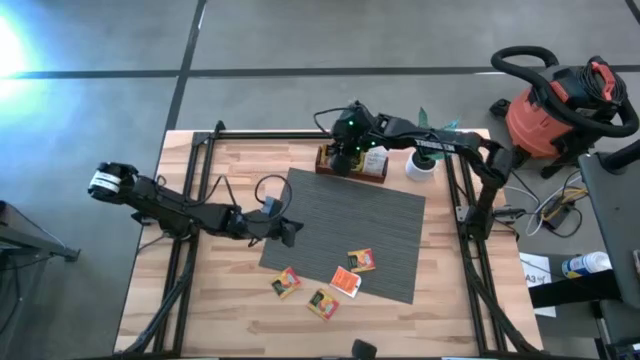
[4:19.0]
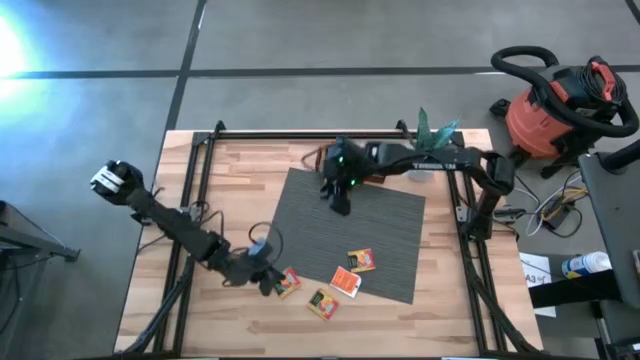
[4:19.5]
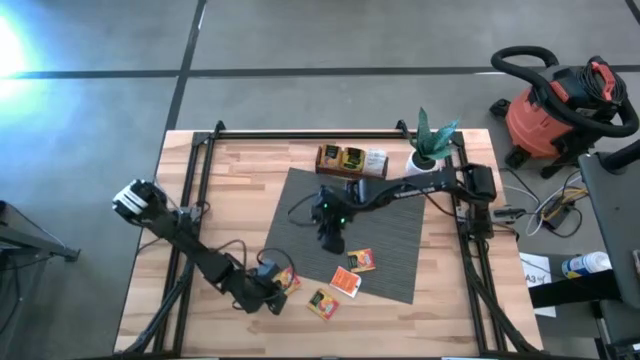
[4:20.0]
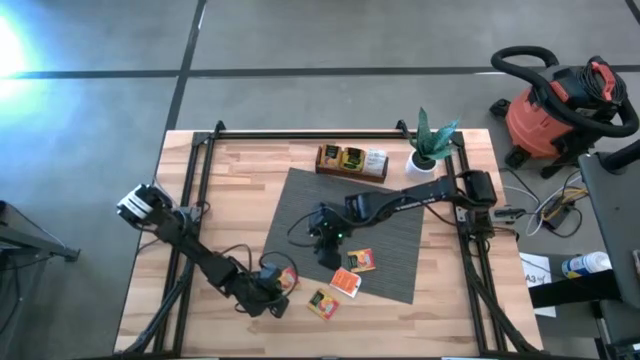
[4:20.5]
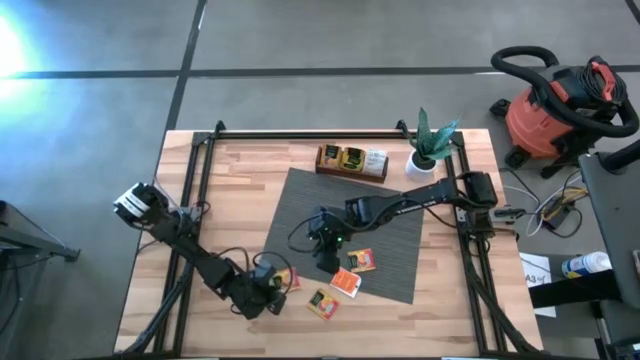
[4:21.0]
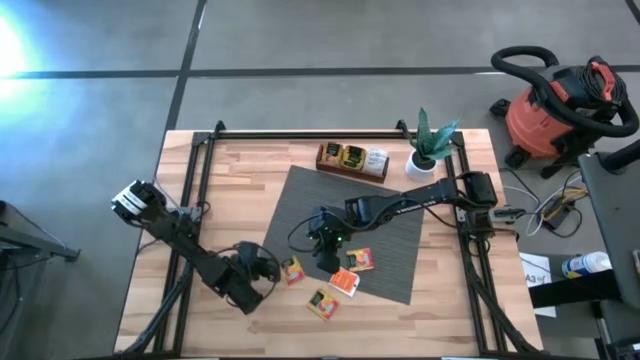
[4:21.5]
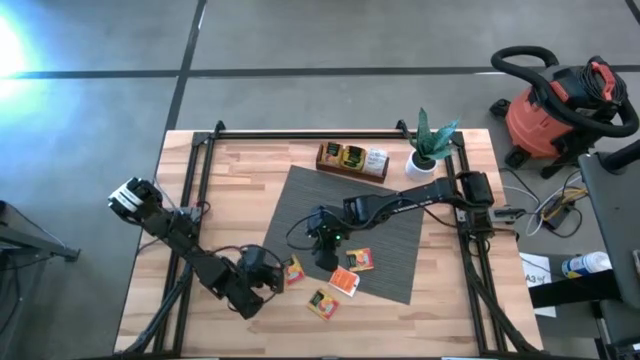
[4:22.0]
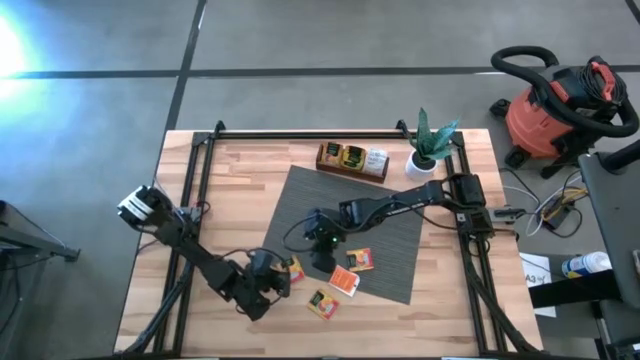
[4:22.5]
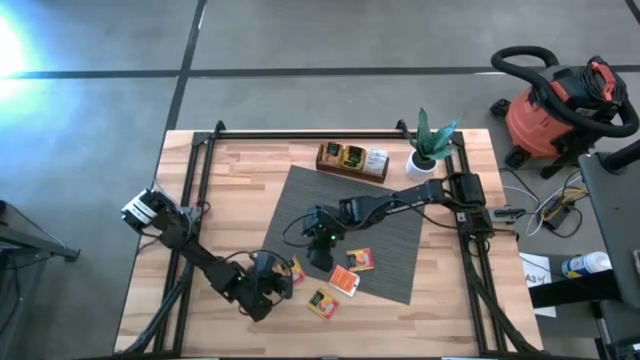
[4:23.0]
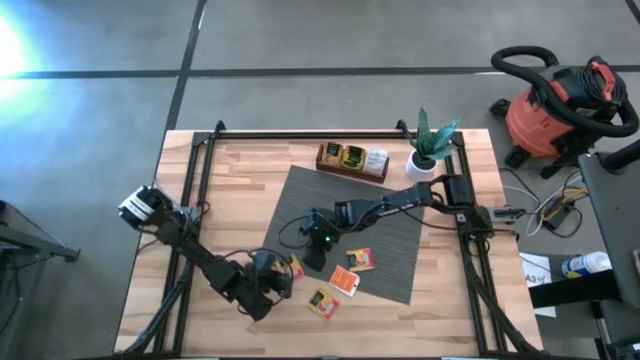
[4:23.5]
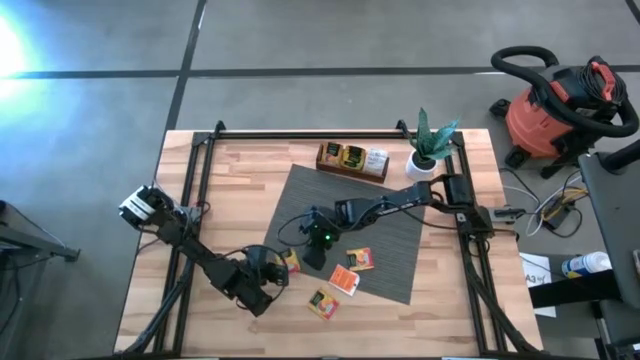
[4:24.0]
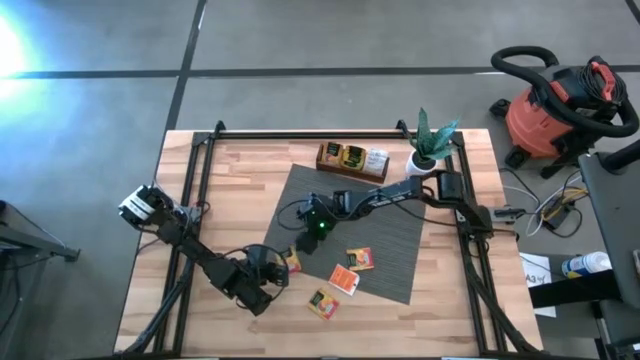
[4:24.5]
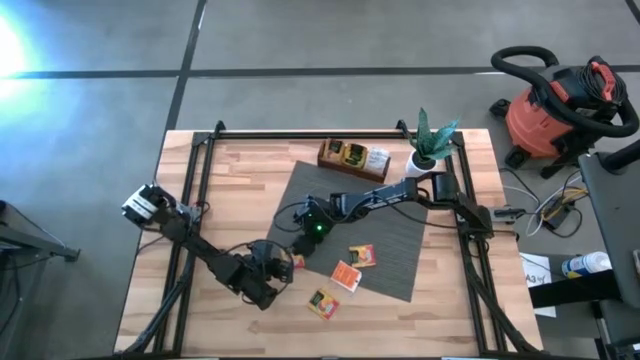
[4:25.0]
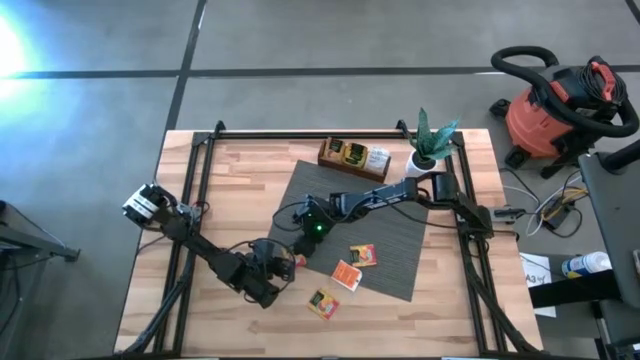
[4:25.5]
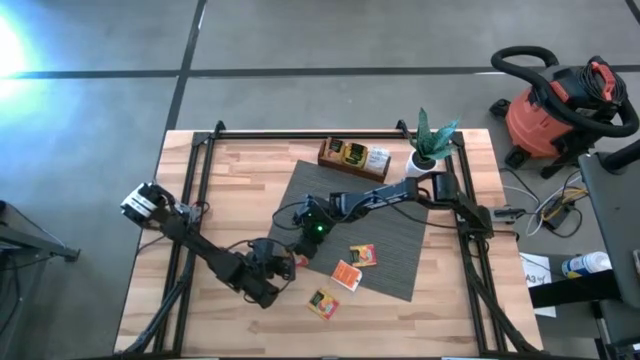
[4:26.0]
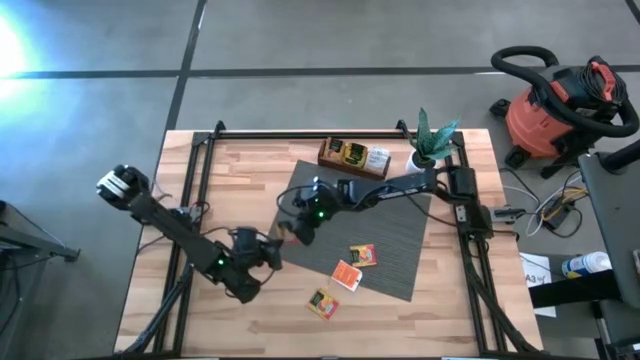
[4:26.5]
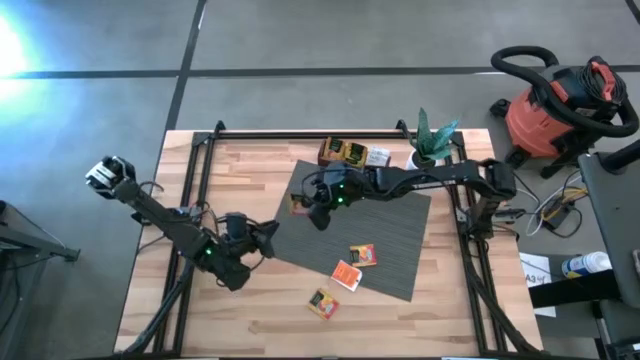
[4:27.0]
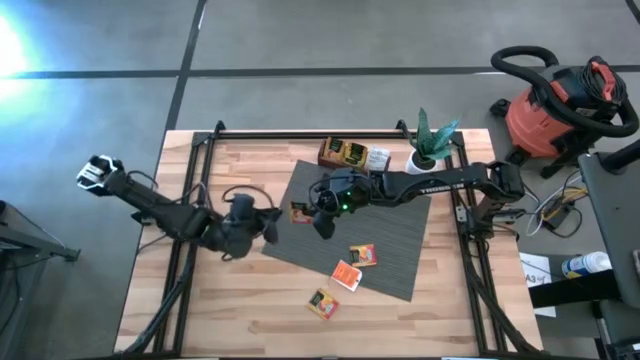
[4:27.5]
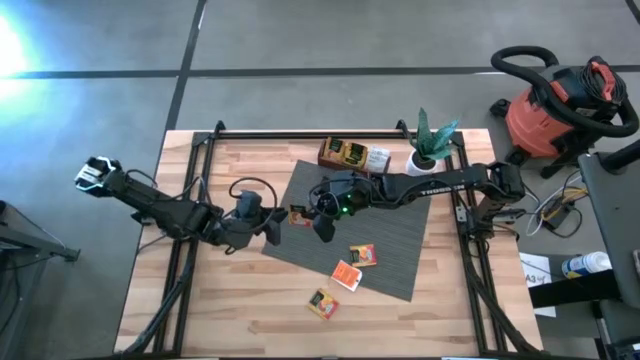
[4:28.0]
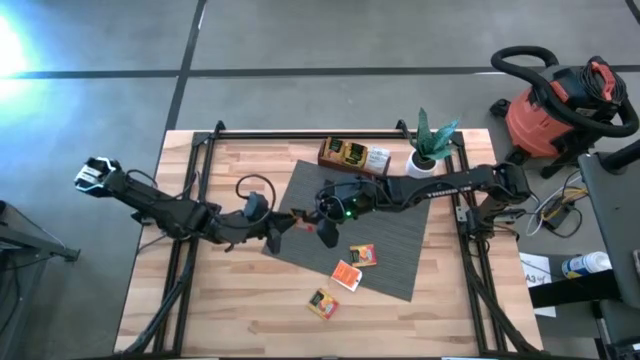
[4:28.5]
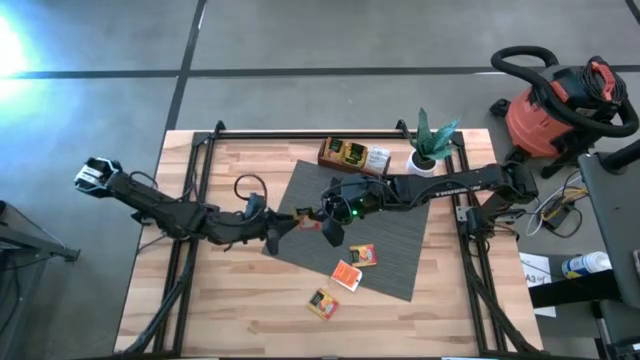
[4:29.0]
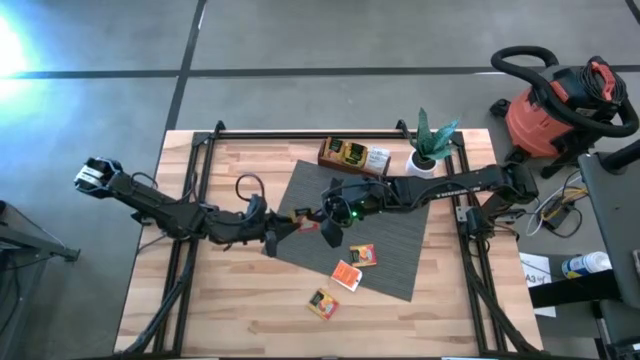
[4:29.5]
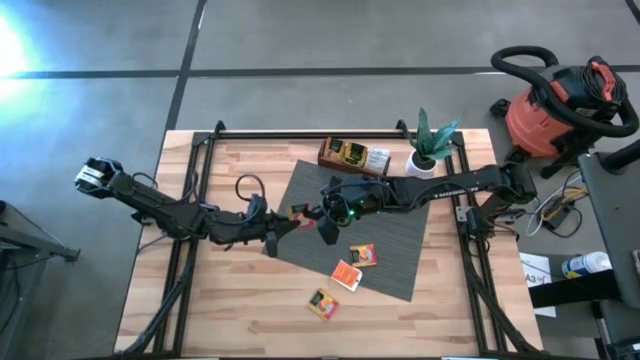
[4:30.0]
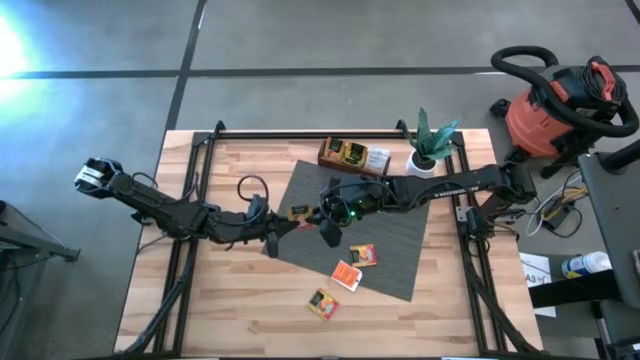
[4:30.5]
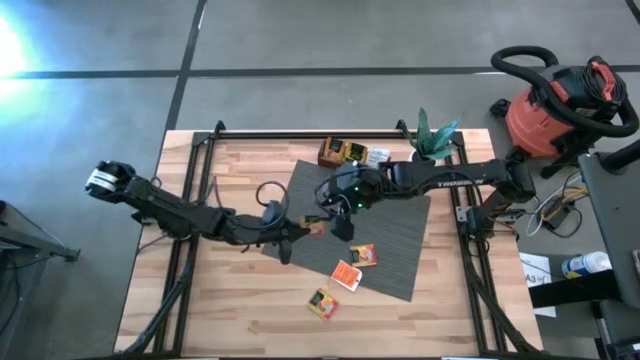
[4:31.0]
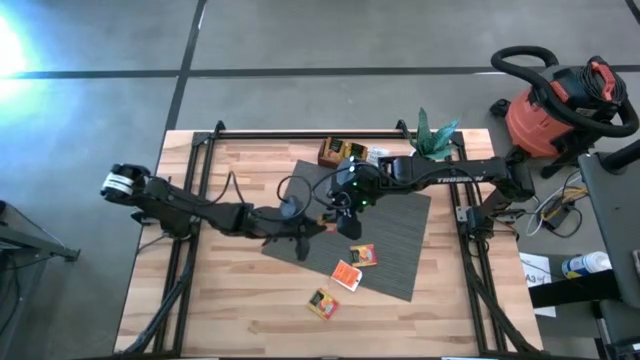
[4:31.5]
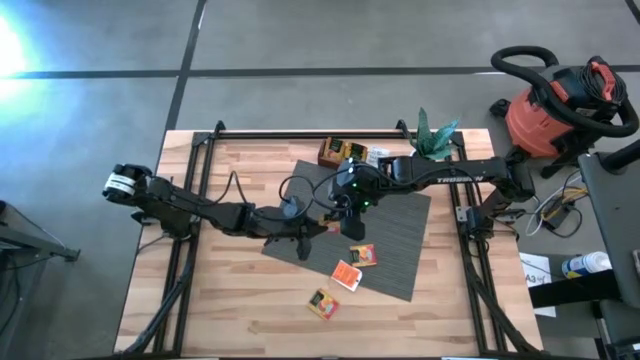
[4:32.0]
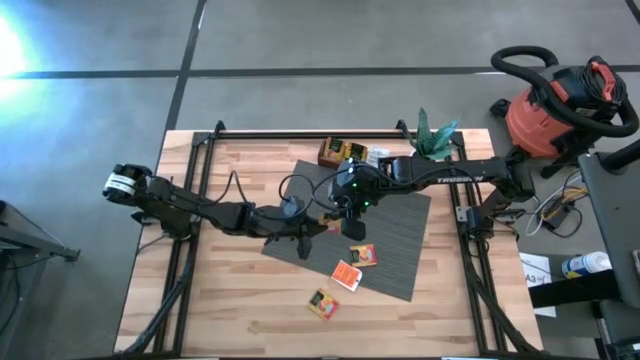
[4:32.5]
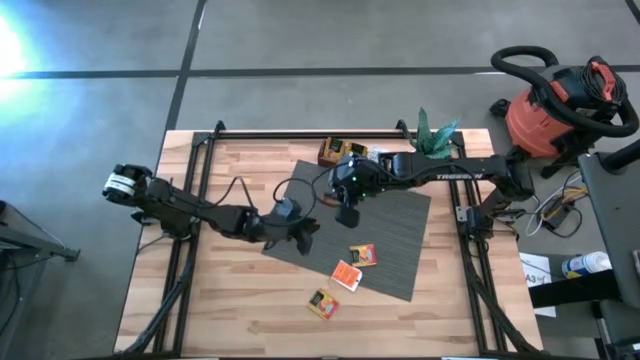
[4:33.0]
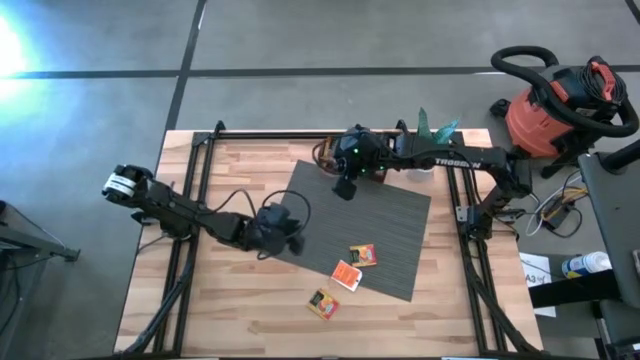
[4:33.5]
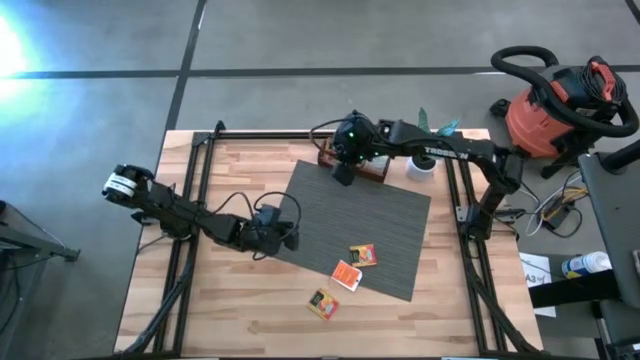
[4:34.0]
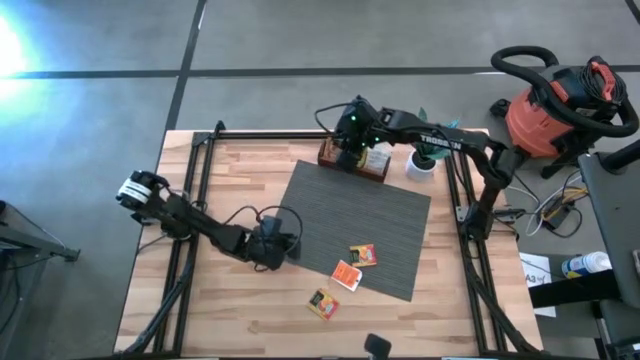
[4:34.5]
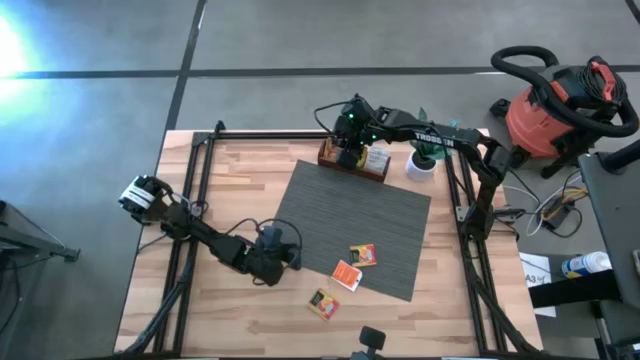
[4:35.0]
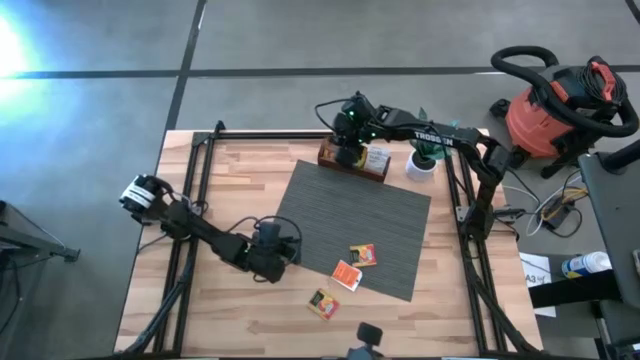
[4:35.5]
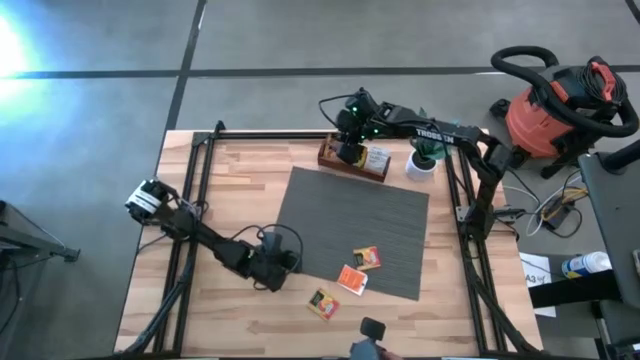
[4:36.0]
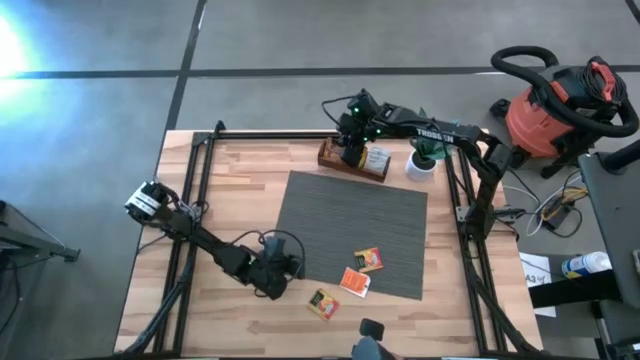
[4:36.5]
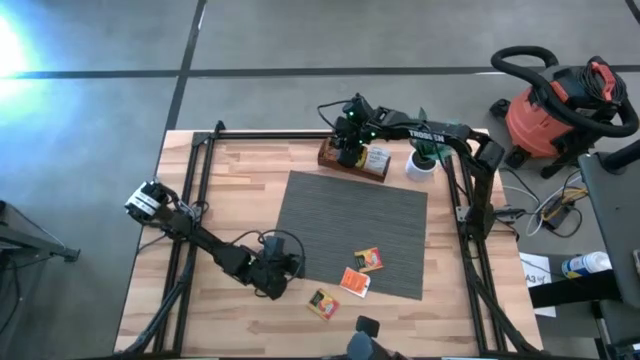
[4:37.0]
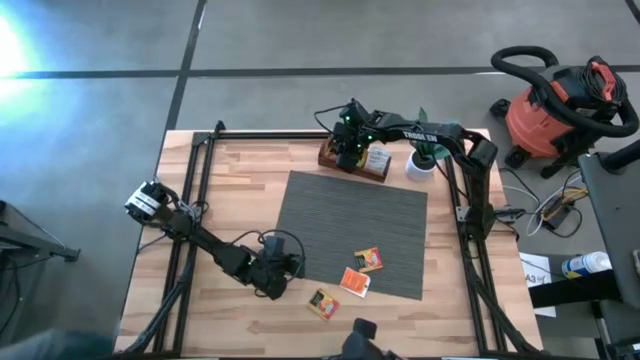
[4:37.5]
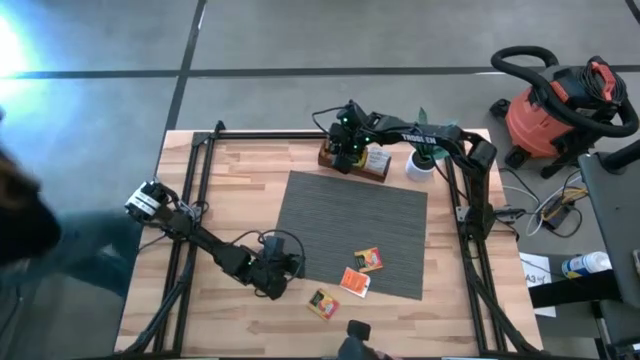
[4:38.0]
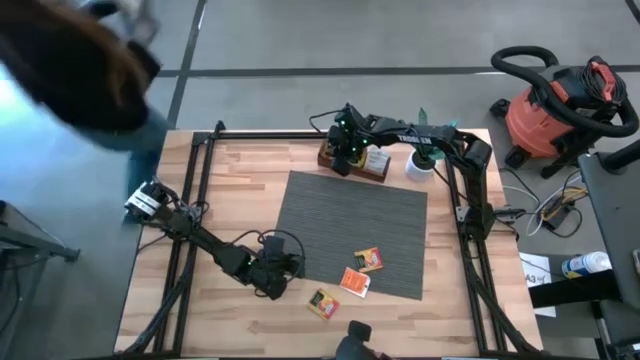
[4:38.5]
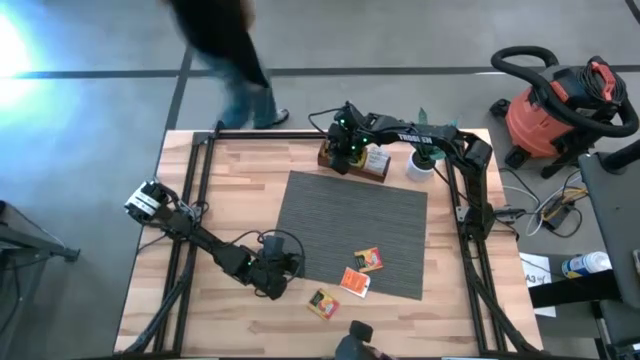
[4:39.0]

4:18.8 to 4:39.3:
Task: Pick & Place Tea
Put the orange tea bag into the left section of the wooden organizer

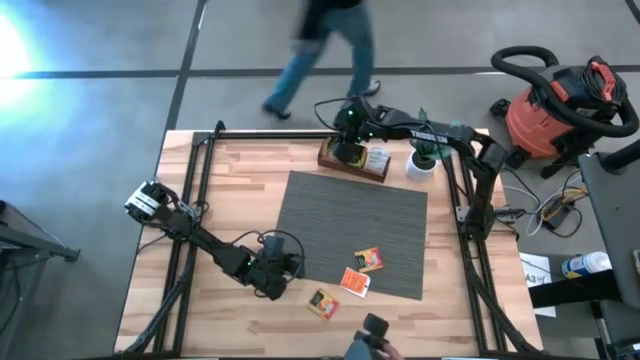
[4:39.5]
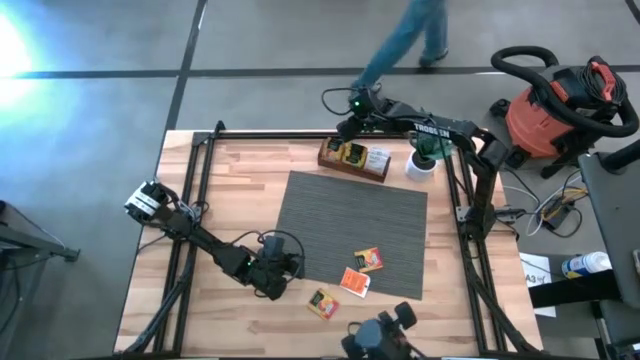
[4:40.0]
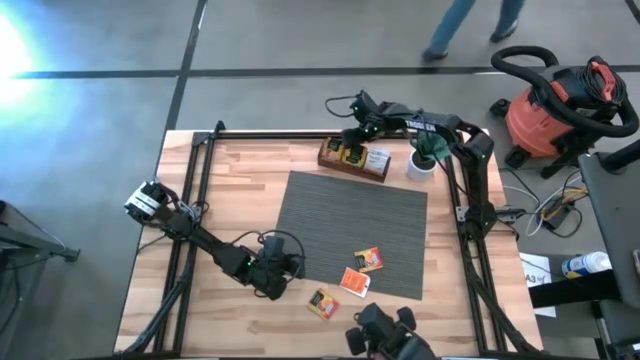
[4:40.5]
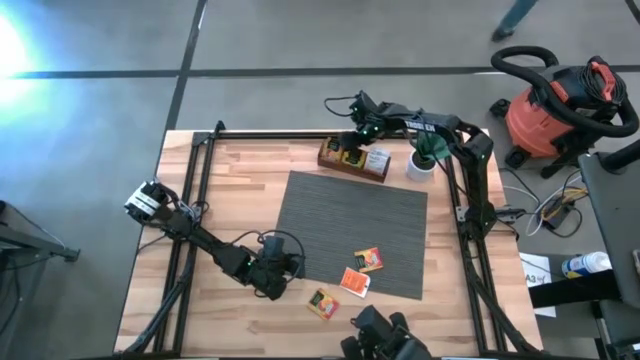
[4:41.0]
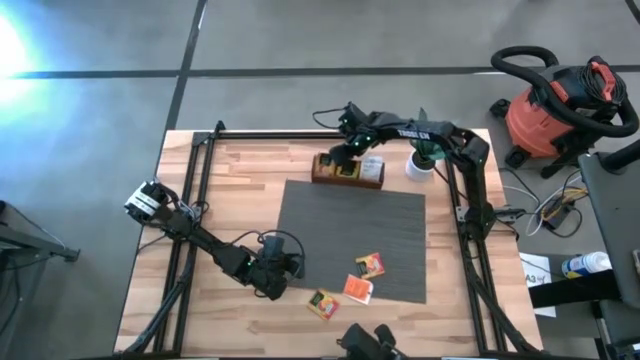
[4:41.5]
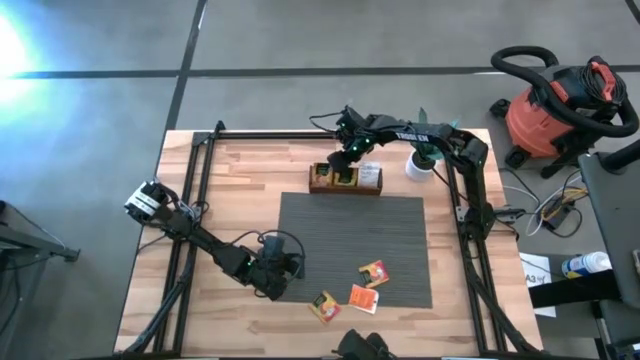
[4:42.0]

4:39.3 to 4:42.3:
Adjust the wooden organizer
